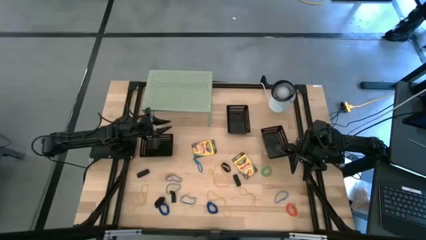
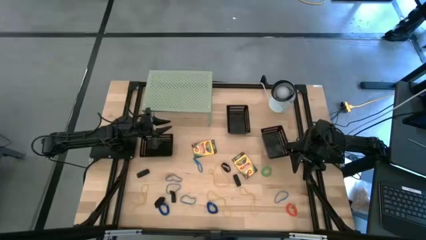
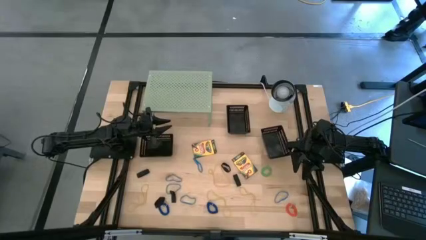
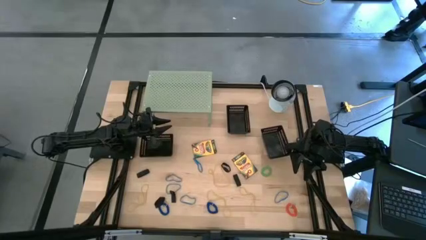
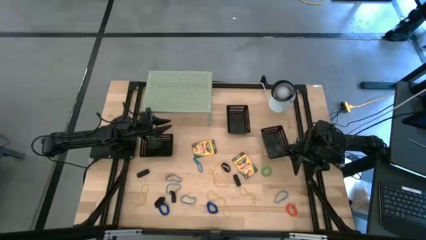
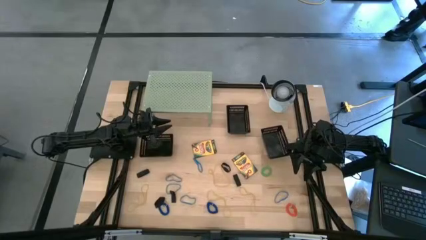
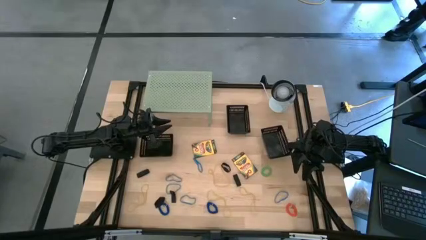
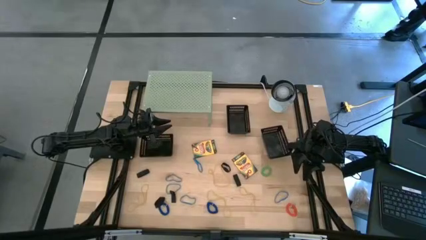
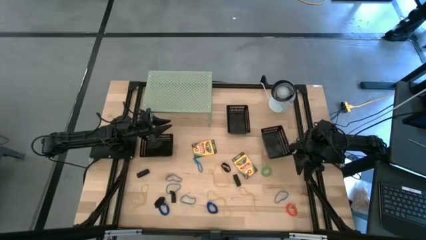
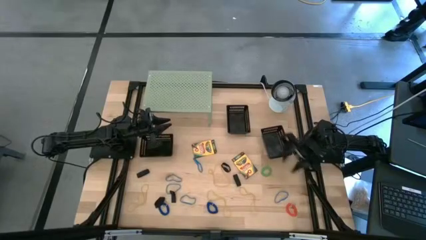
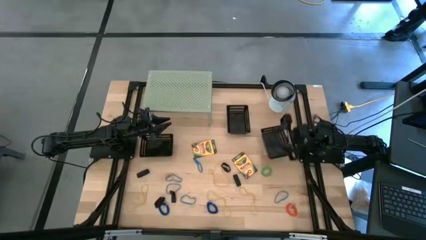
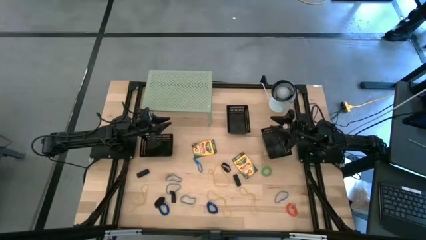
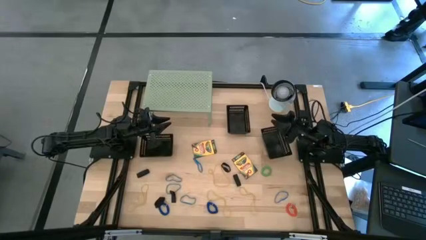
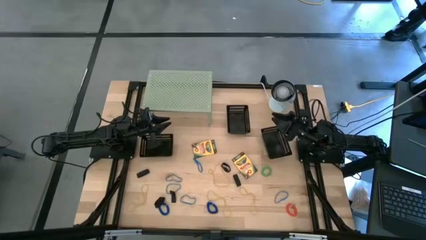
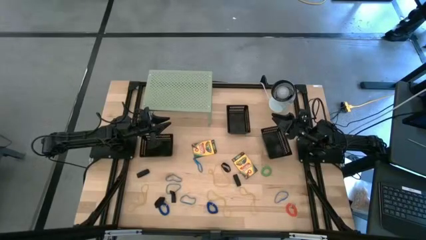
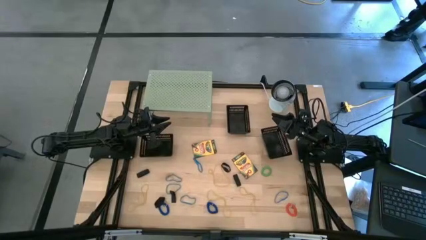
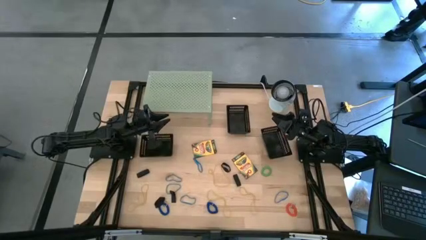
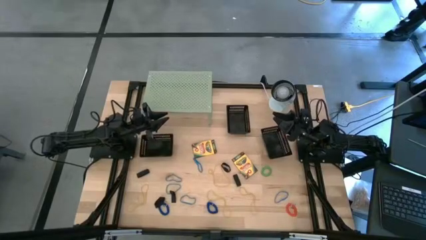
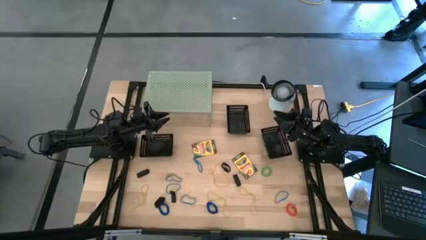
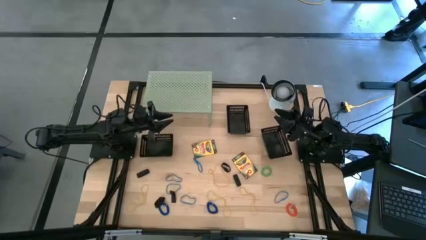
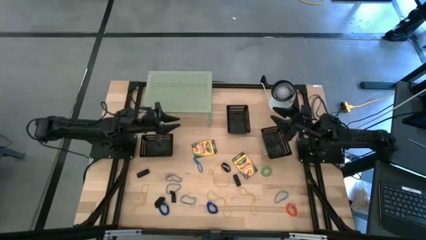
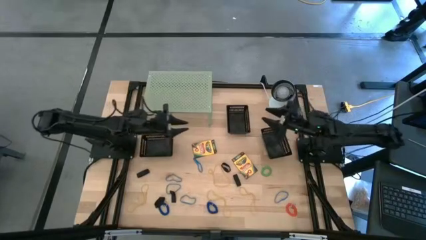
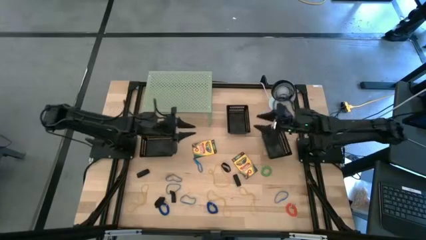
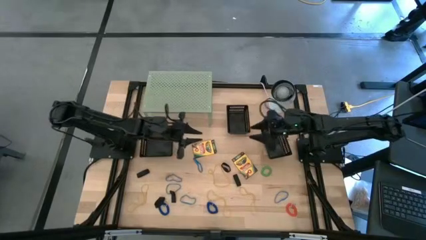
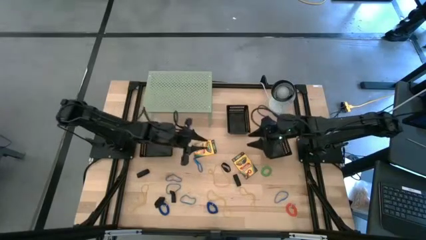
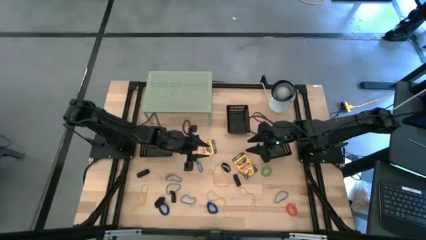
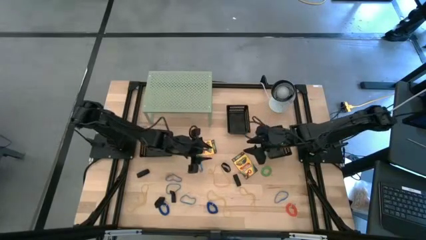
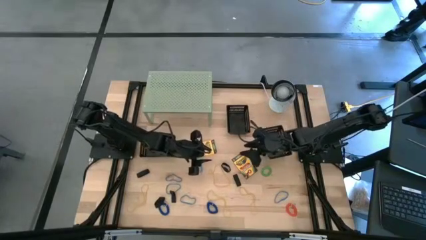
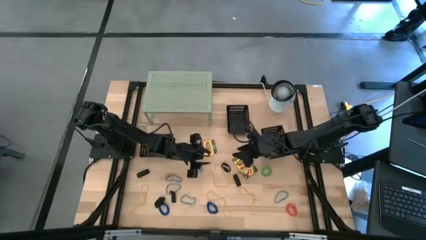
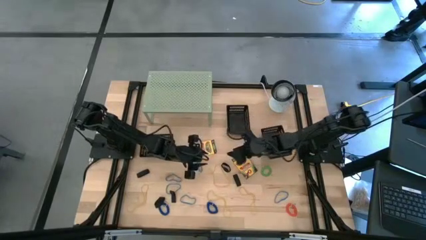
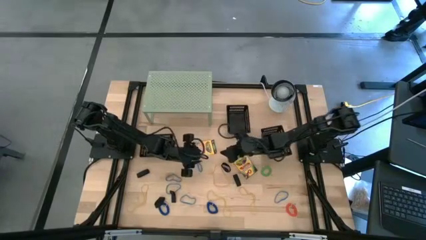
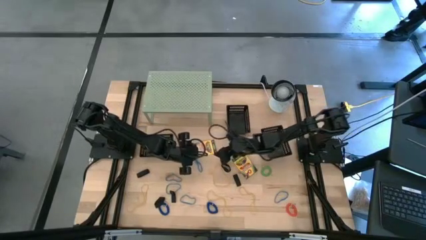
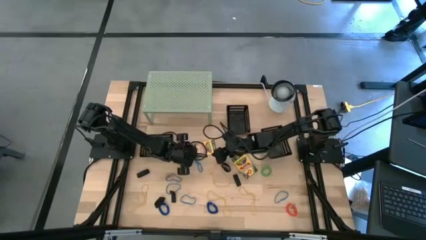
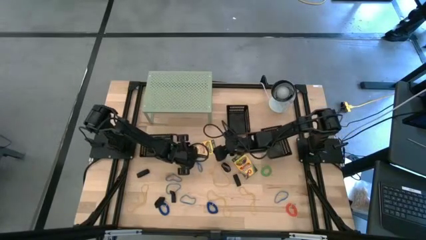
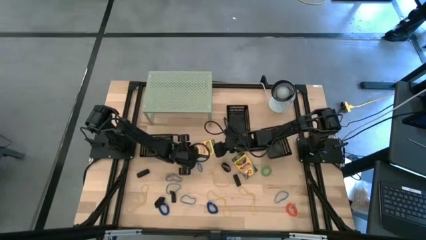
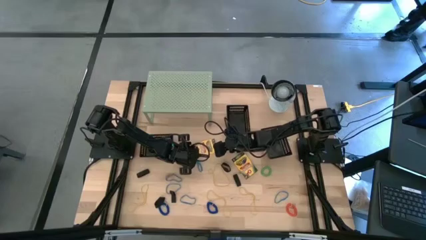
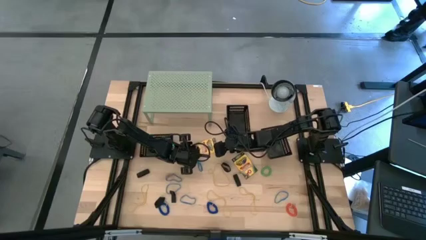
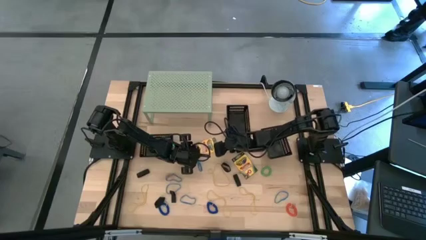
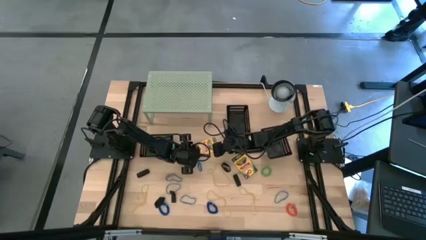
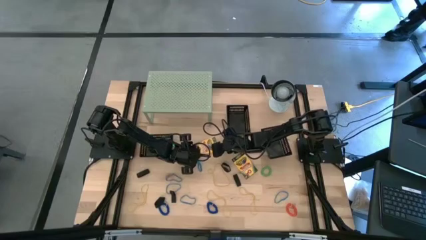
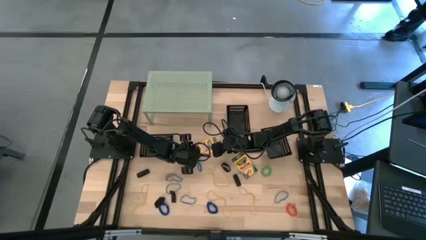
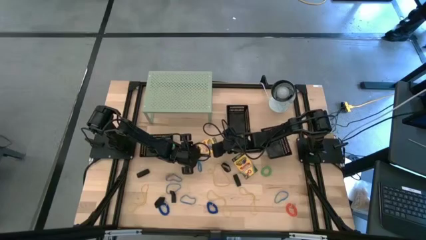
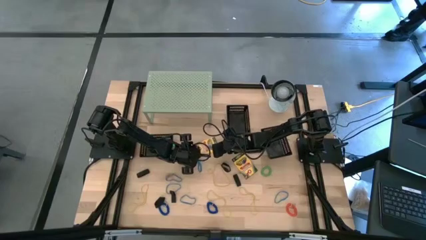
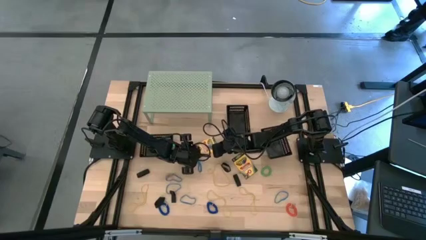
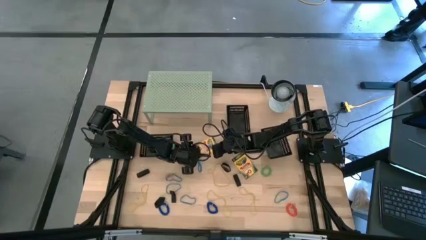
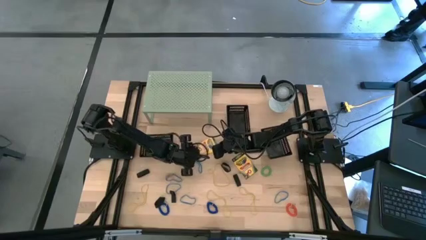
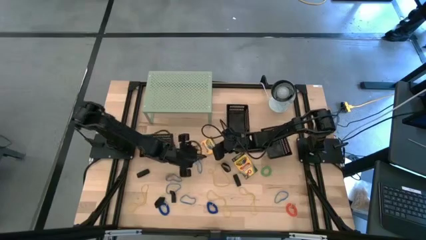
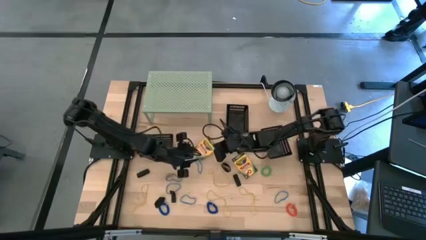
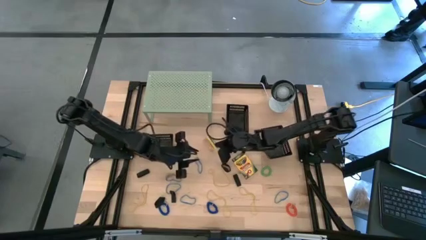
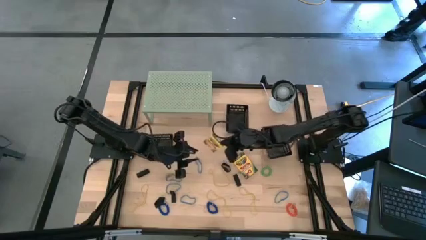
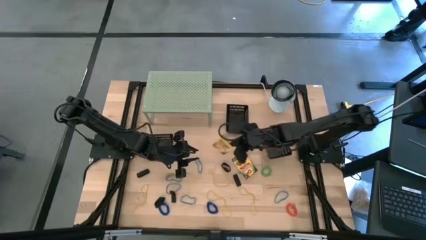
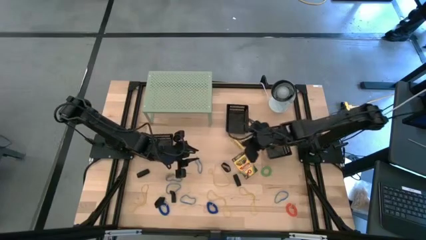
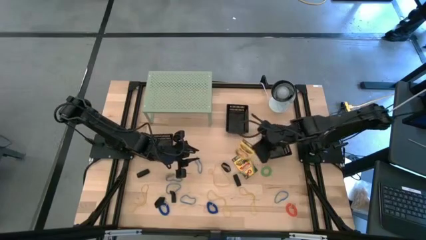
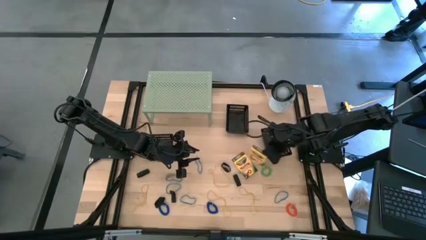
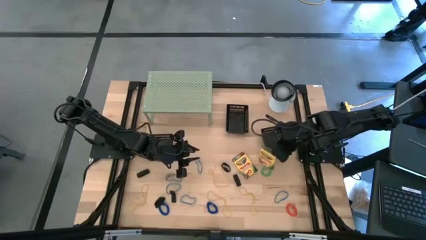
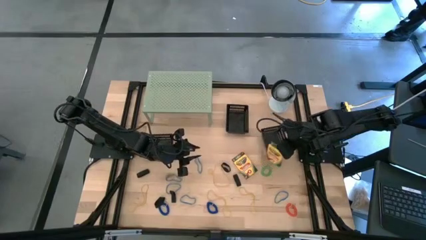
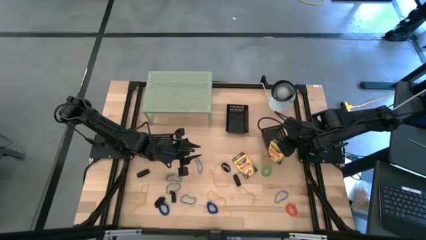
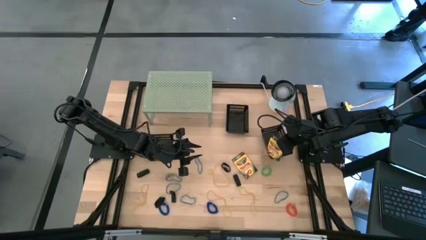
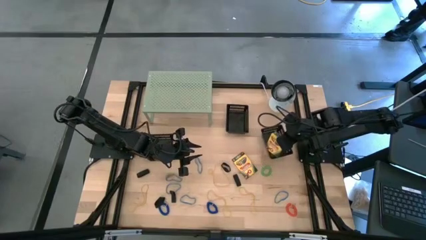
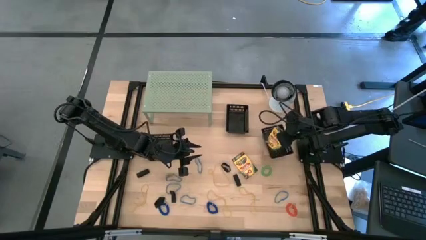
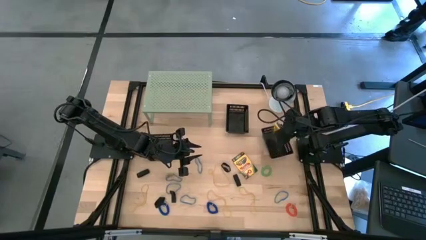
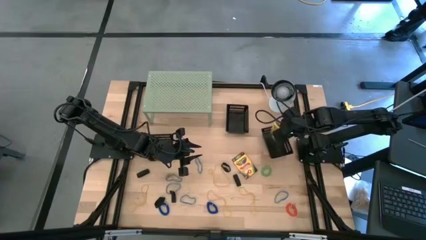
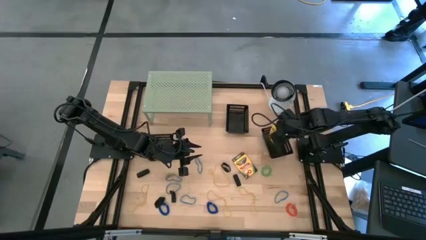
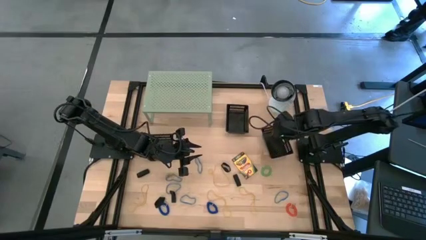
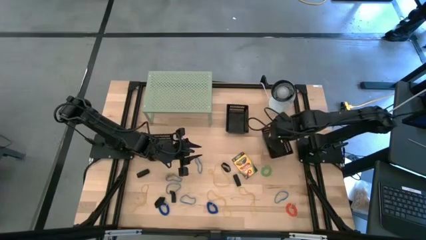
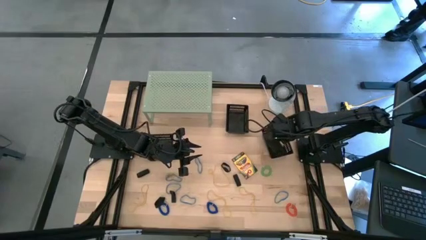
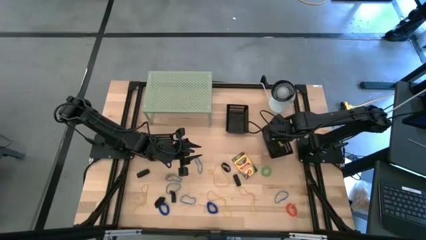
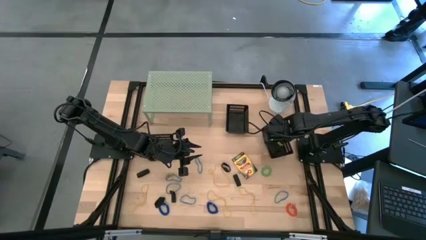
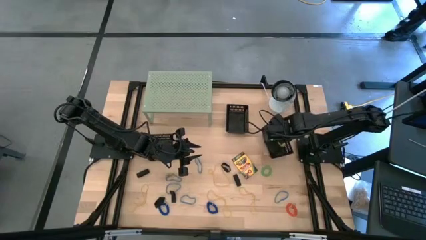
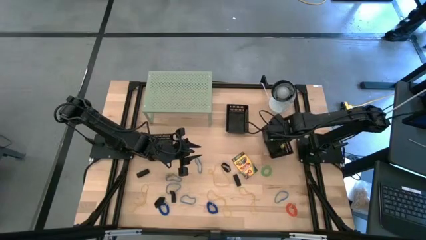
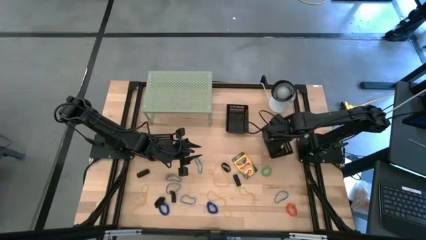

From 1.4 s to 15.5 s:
Task: Pick & Place Office Desk Supplies
Put the yellow crayon box into the right black bin
